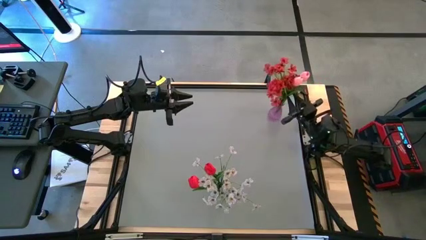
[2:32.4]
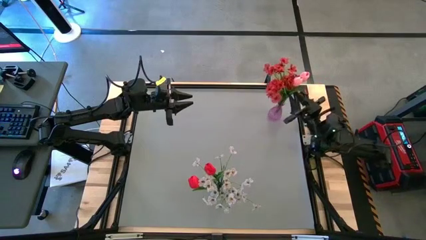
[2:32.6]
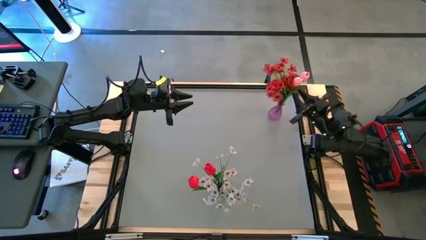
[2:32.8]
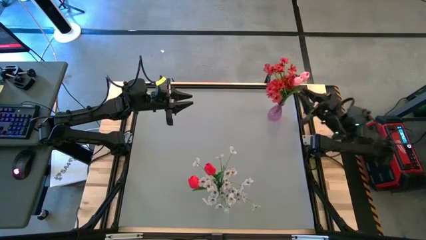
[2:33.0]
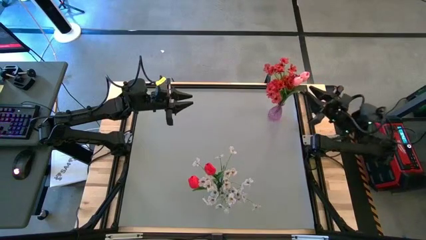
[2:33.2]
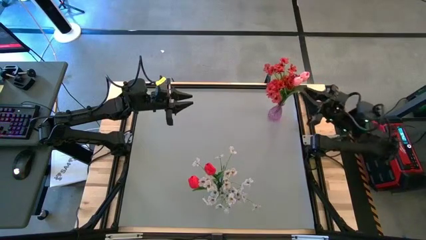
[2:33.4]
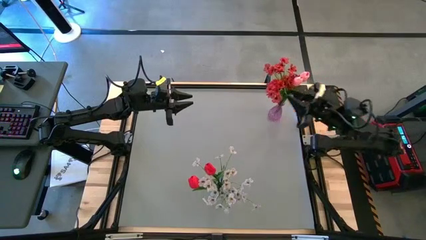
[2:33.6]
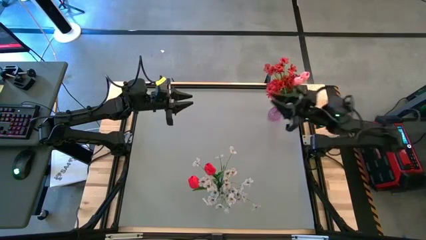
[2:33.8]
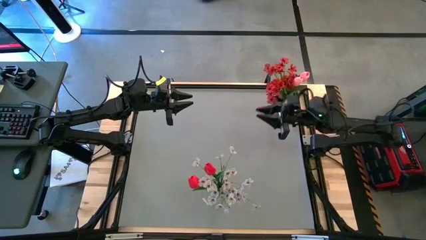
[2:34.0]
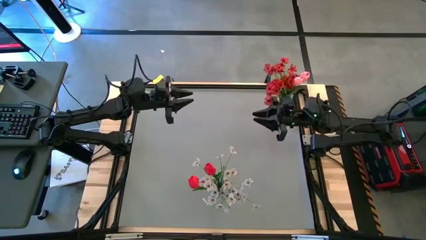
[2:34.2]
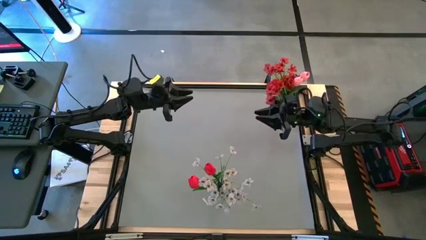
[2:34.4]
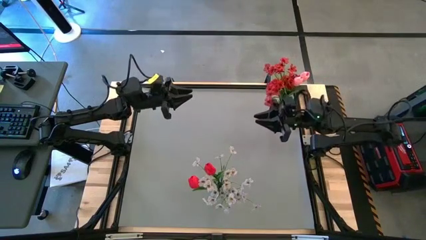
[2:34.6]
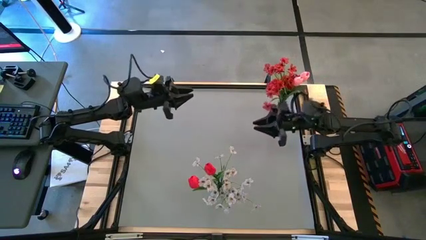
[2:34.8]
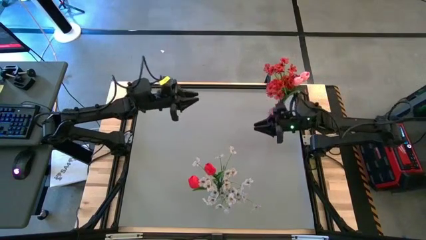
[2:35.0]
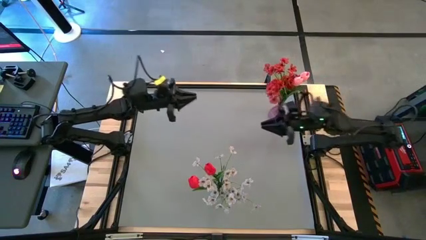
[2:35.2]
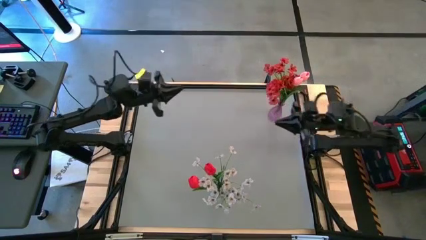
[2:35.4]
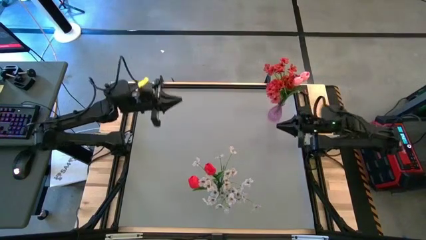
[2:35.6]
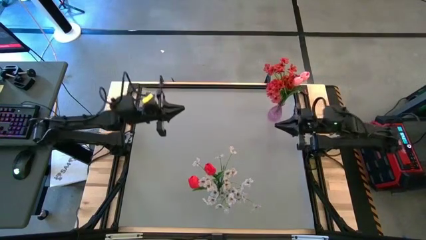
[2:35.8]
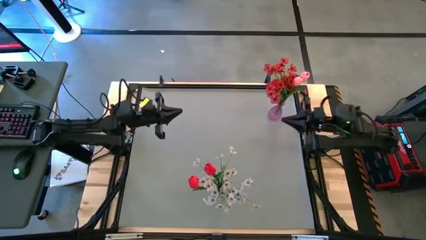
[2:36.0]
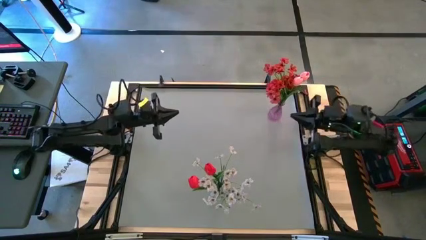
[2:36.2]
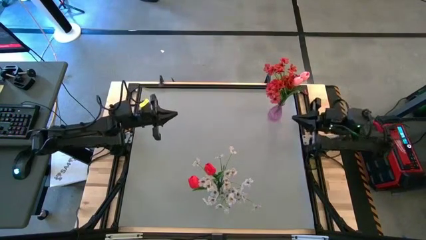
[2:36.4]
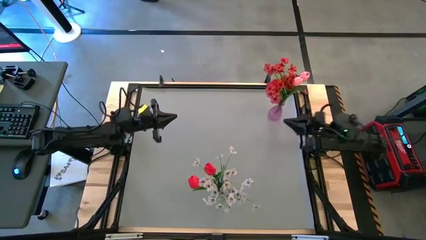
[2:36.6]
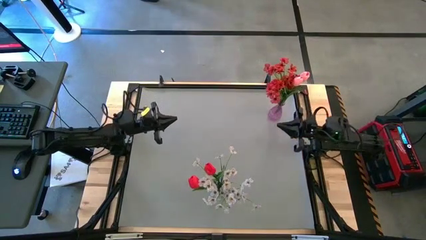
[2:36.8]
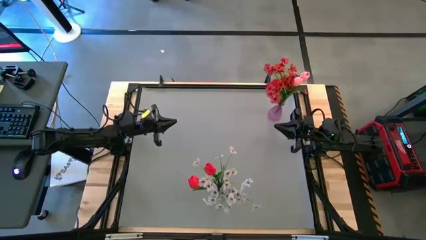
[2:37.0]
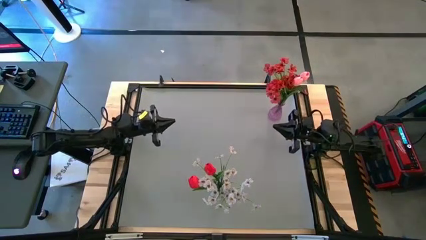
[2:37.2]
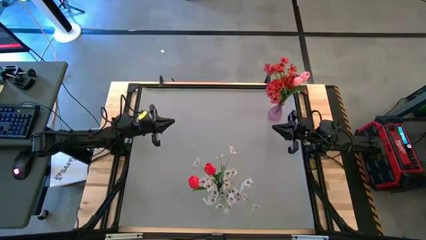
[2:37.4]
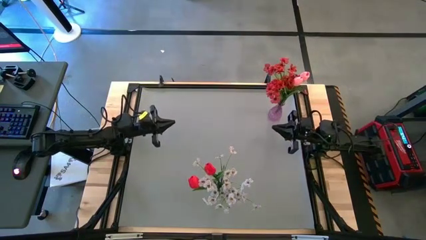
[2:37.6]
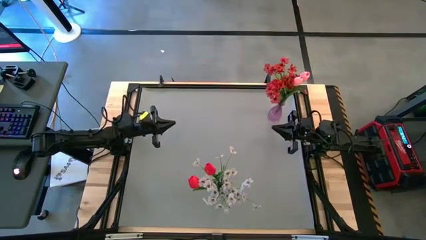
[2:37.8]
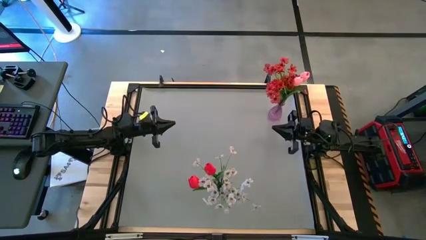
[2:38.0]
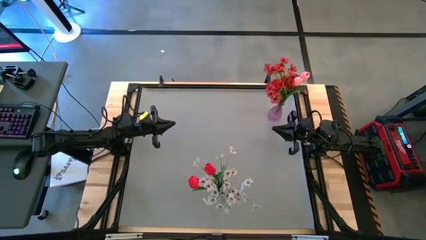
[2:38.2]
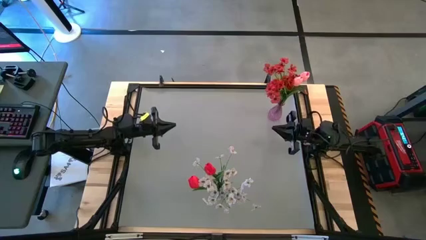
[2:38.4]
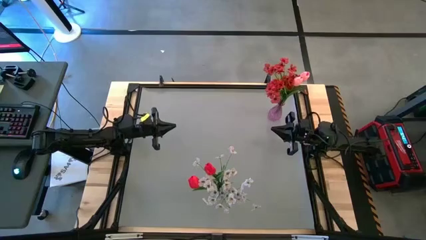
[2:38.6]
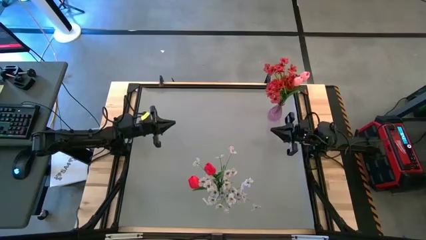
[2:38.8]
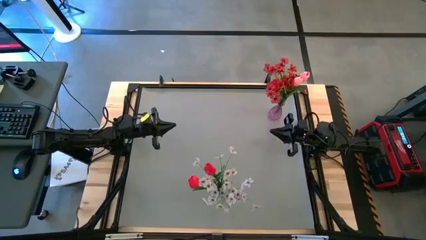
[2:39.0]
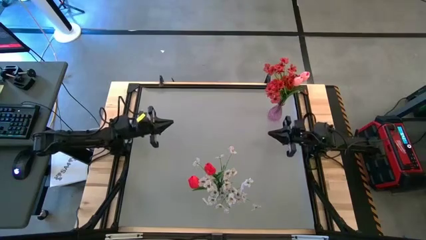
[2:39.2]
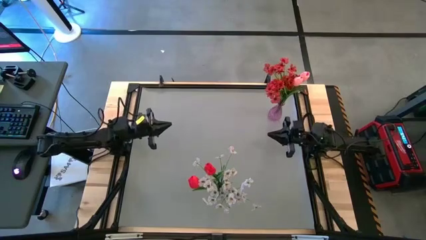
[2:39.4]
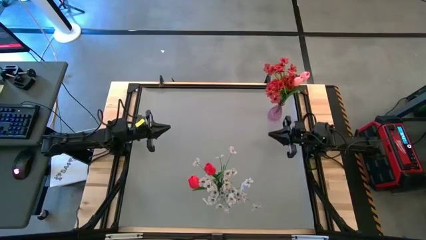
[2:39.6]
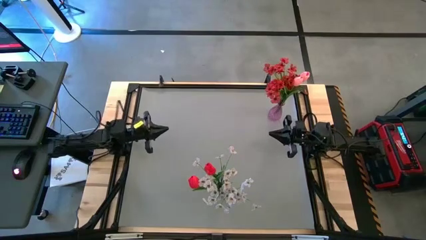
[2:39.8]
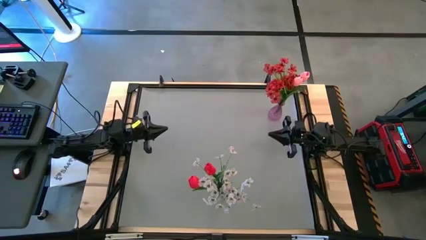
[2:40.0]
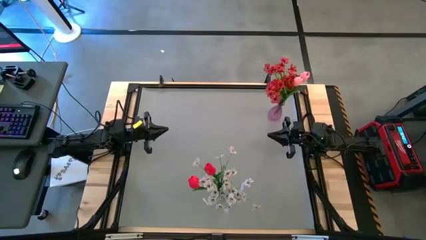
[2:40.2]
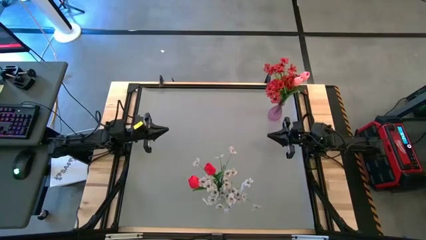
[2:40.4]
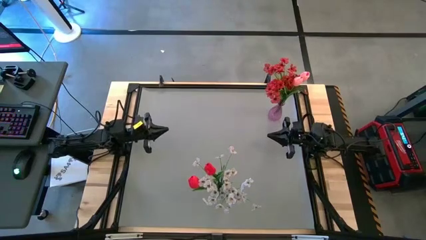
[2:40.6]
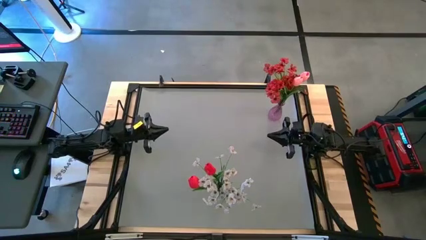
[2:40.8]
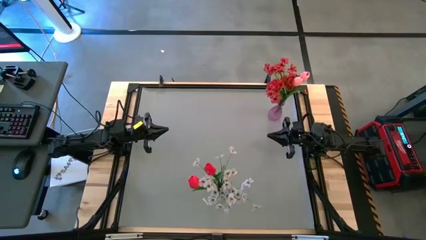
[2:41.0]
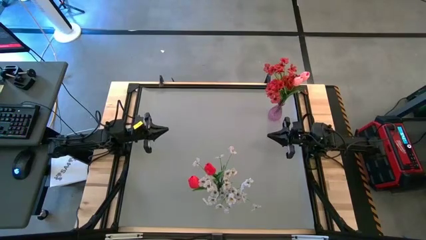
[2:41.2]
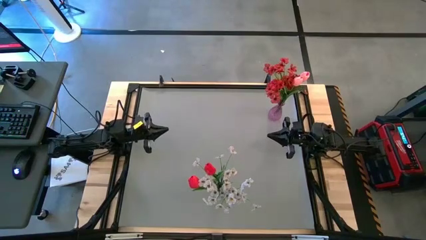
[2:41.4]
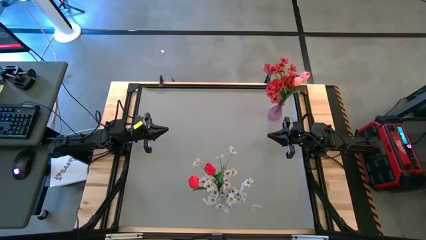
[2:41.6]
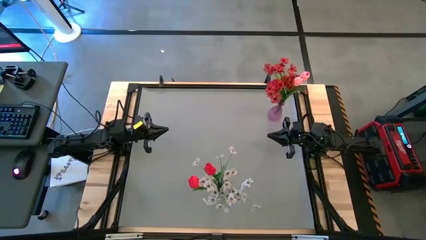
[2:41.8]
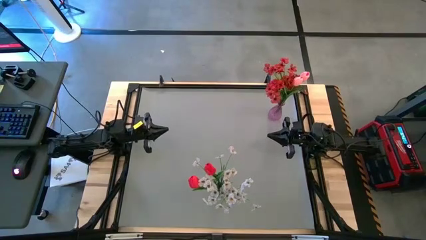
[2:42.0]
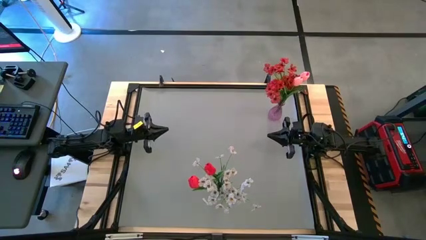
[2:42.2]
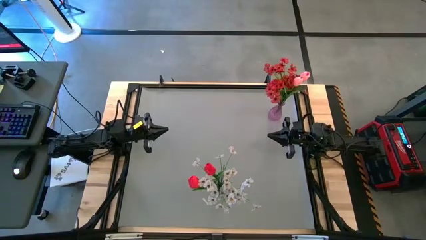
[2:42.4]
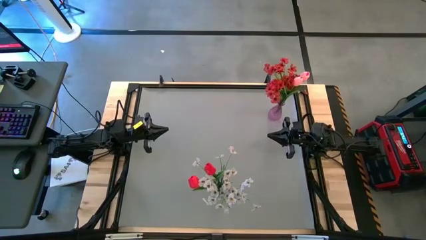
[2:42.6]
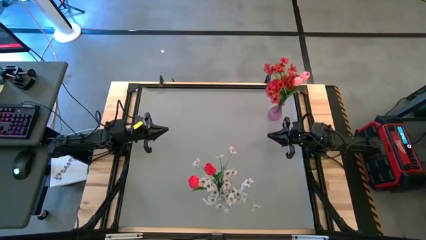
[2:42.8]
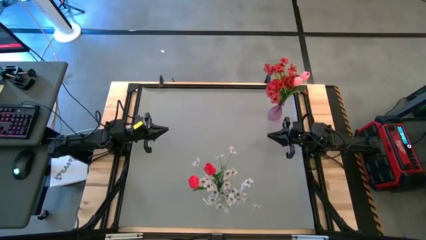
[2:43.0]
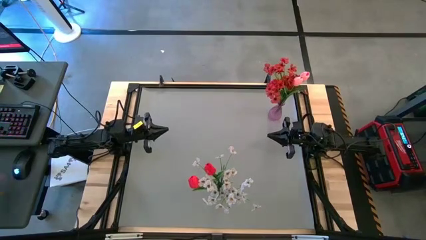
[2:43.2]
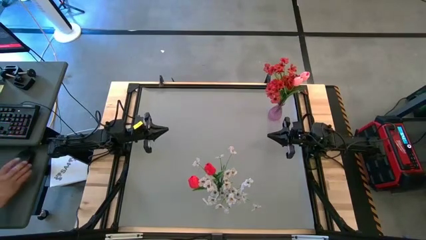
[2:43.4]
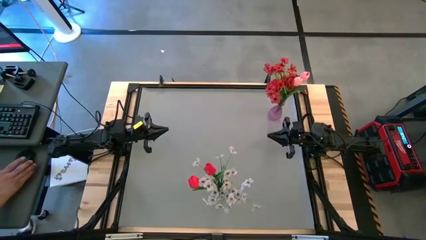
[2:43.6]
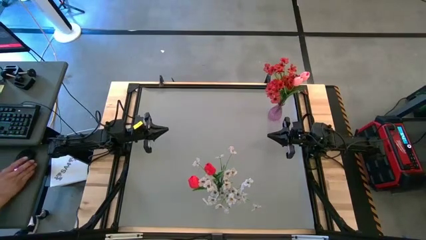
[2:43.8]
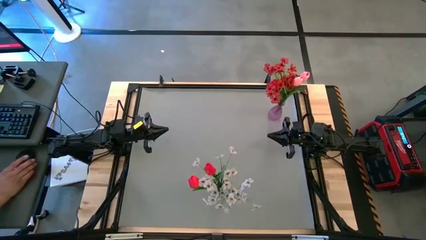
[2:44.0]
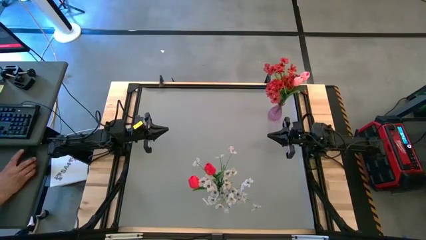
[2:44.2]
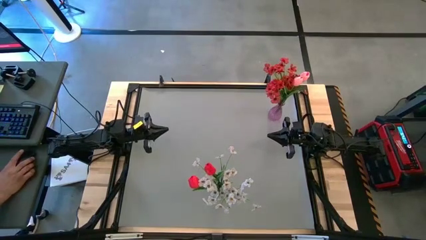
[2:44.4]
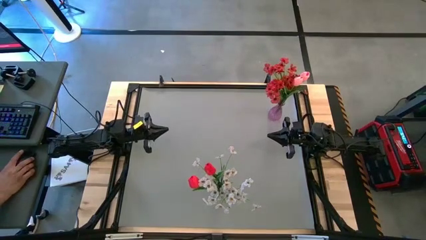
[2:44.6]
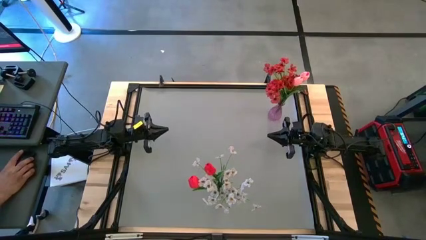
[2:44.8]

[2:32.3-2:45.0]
Task: Sort flowers into vase by color
Return to Home Position

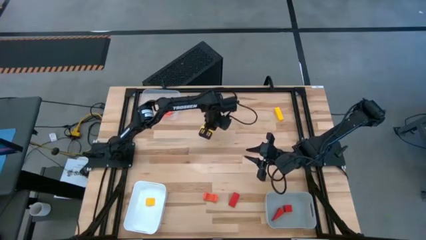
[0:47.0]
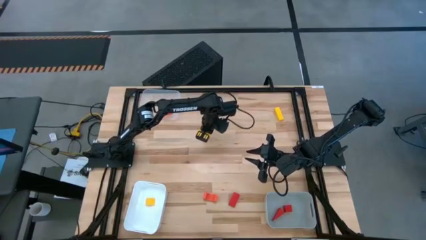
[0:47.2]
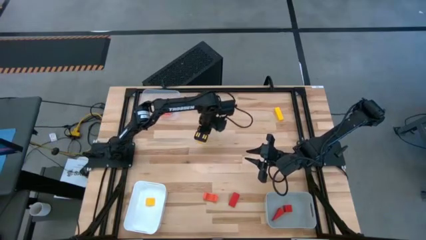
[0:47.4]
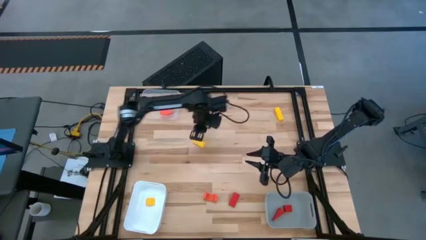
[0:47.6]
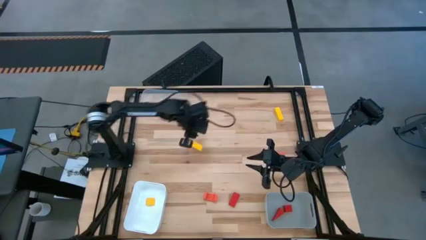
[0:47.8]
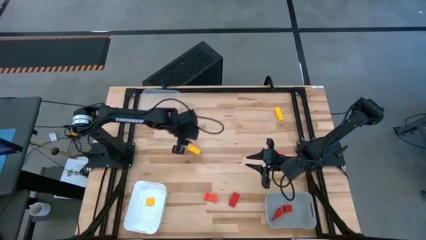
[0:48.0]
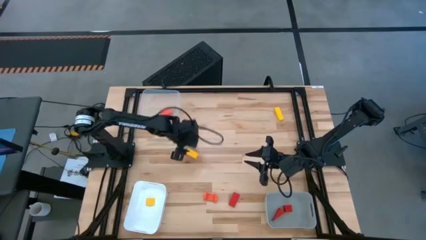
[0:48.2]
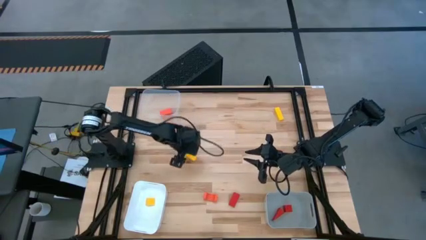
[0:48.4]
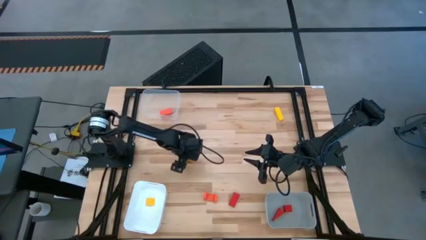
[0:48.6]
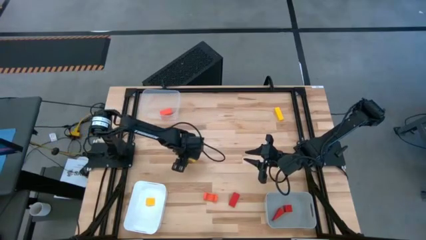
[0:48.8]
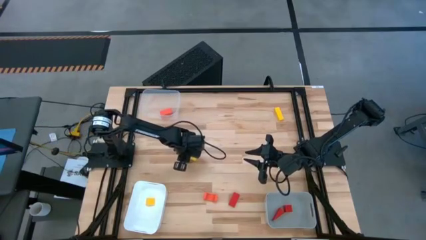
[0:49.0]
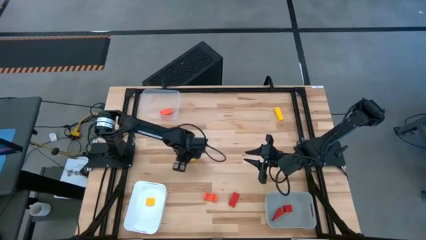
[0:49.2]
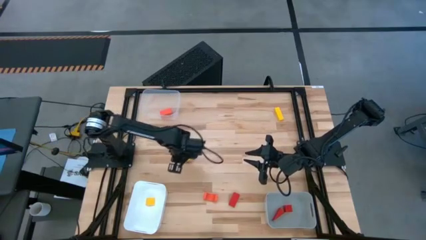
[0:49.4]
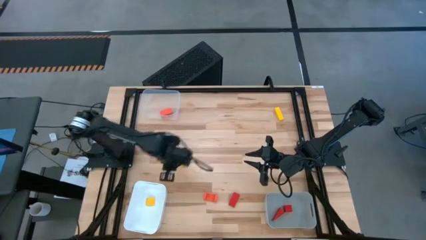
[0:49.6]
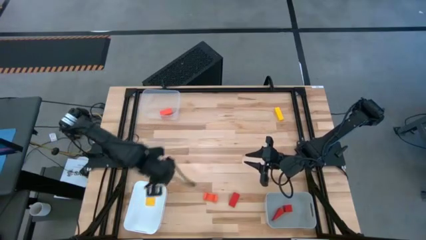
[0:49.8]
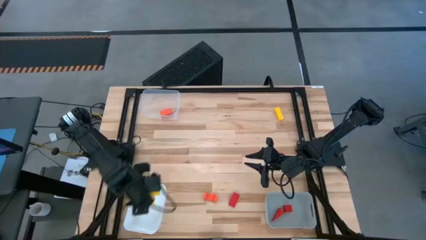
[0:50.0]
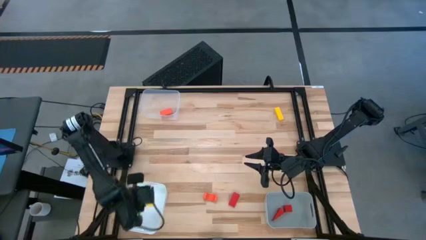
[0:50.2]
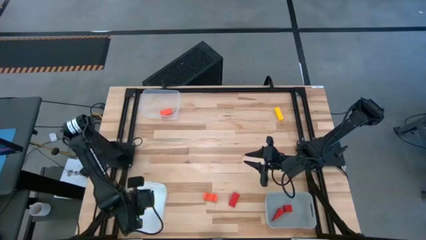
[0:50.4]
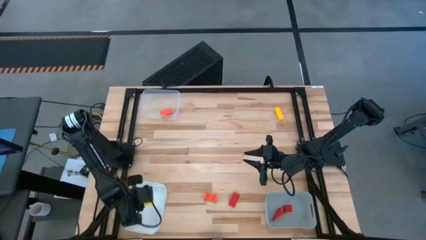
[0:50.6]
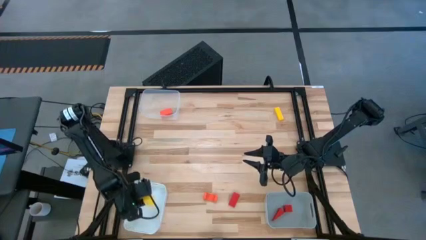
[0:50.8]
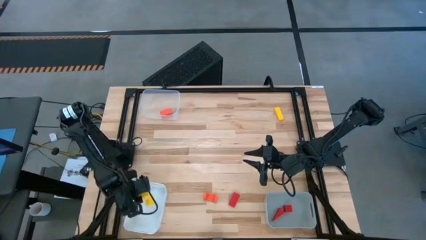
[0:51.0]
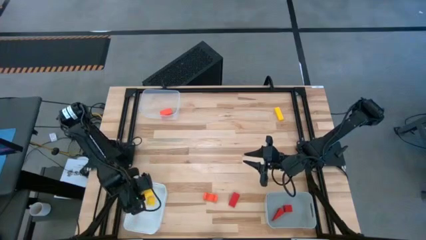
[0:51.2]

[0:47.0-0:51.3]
Task: Sort & place blocks by color
Put the bottom yellow block into the white bin
